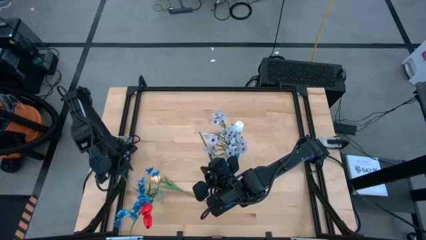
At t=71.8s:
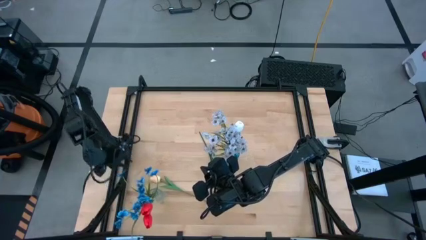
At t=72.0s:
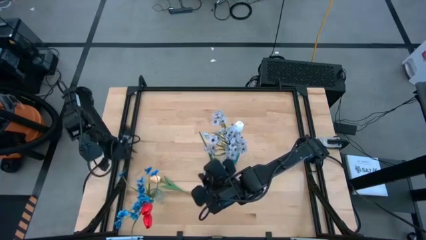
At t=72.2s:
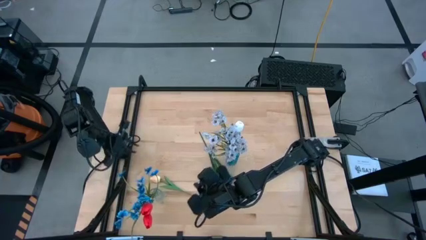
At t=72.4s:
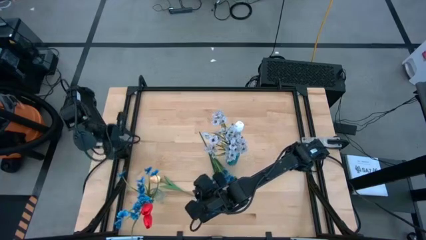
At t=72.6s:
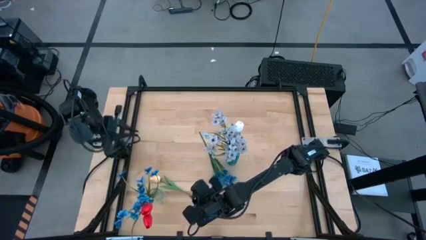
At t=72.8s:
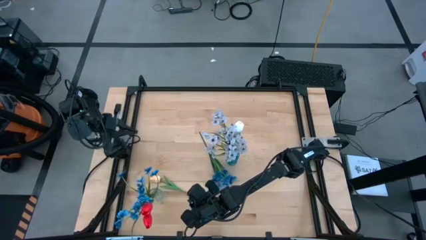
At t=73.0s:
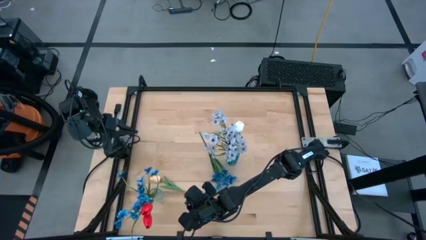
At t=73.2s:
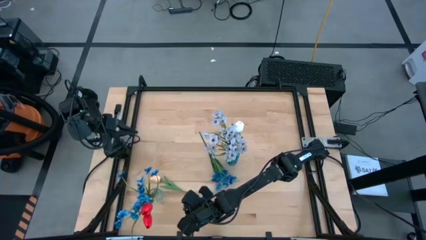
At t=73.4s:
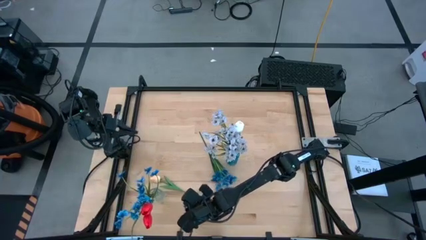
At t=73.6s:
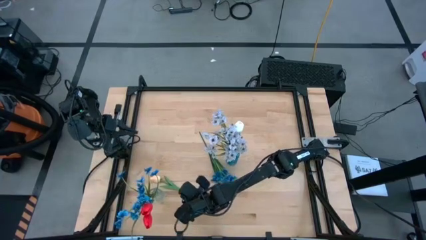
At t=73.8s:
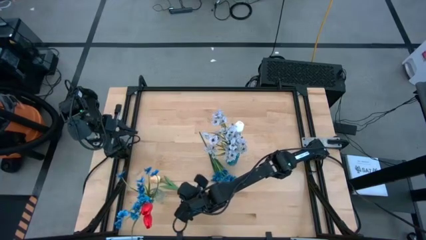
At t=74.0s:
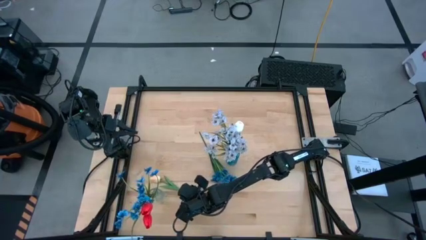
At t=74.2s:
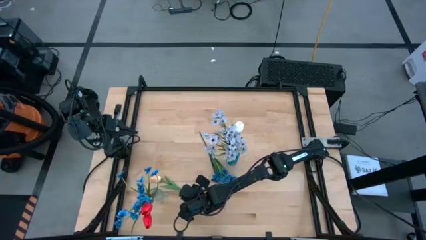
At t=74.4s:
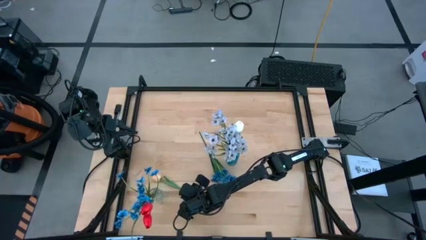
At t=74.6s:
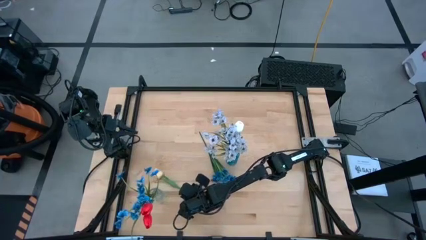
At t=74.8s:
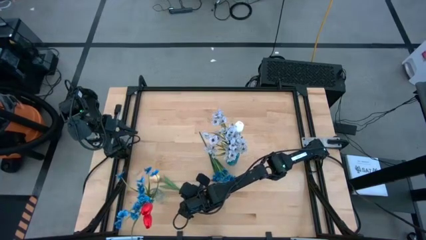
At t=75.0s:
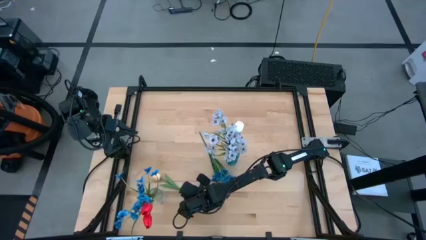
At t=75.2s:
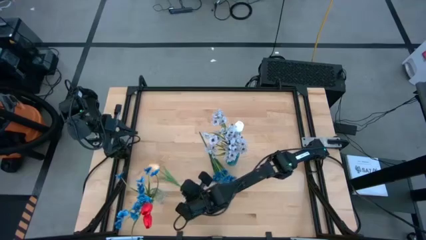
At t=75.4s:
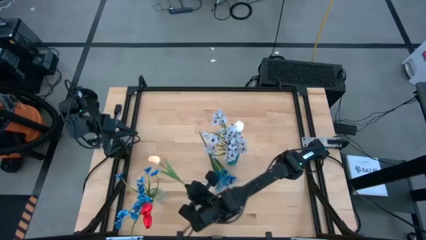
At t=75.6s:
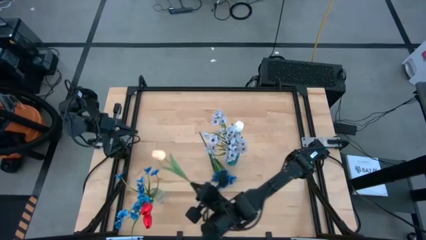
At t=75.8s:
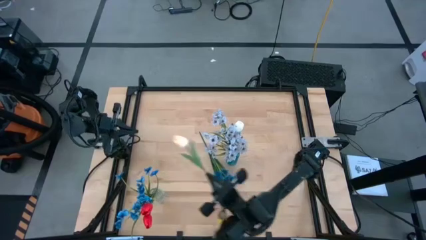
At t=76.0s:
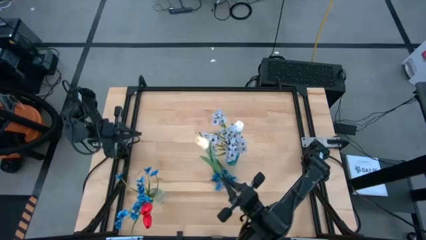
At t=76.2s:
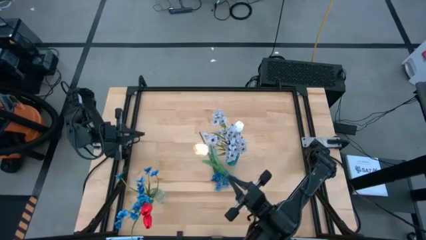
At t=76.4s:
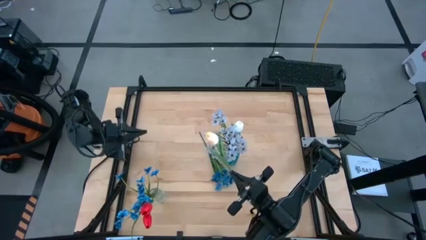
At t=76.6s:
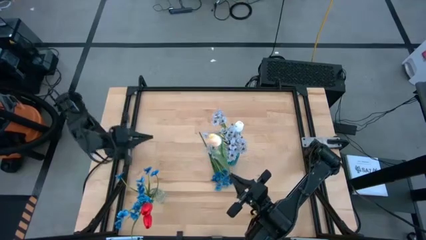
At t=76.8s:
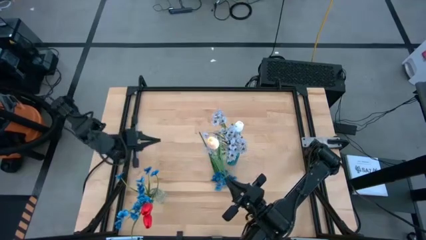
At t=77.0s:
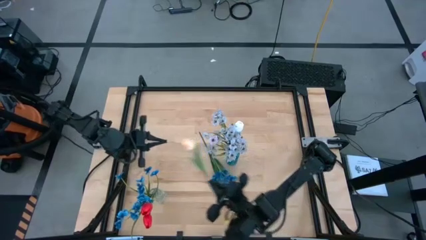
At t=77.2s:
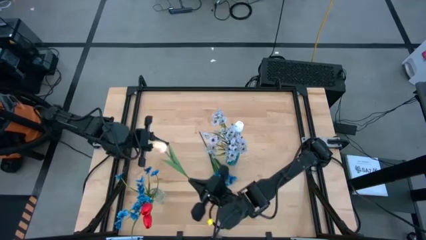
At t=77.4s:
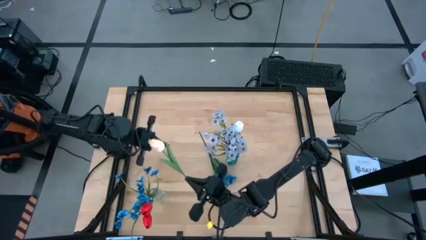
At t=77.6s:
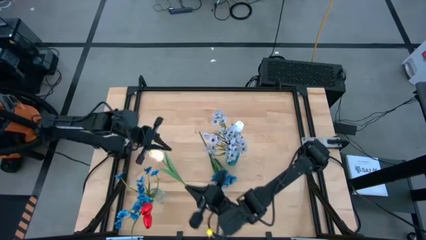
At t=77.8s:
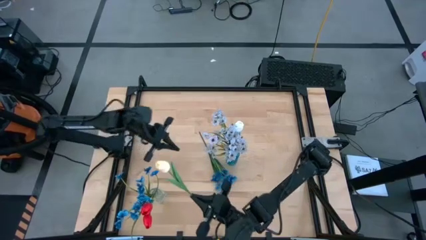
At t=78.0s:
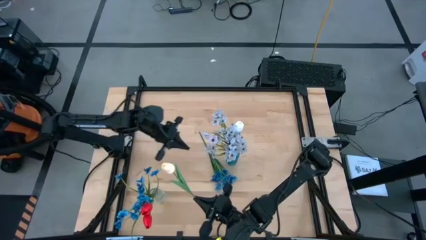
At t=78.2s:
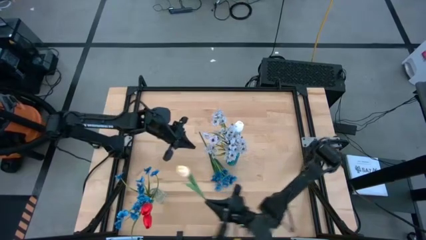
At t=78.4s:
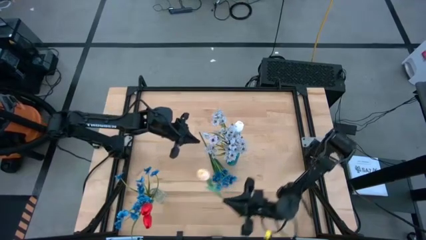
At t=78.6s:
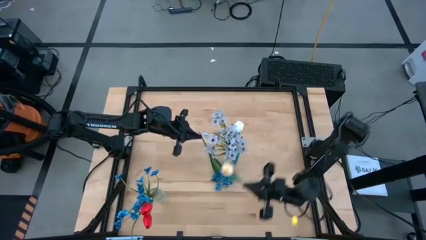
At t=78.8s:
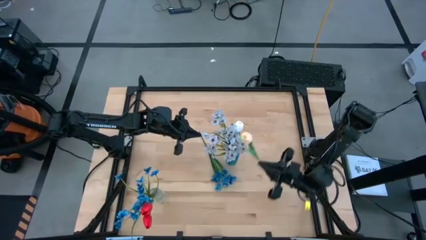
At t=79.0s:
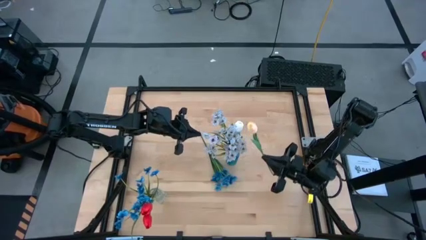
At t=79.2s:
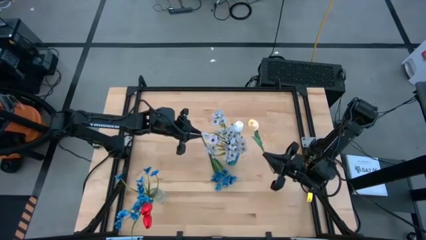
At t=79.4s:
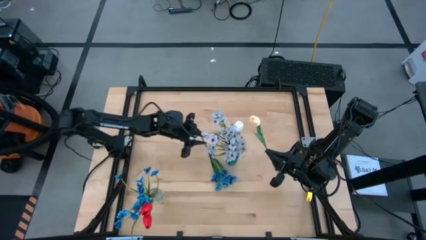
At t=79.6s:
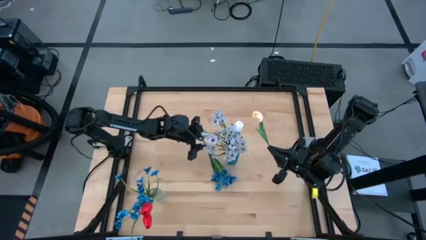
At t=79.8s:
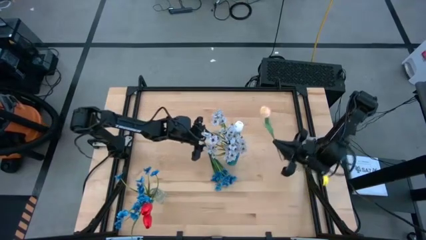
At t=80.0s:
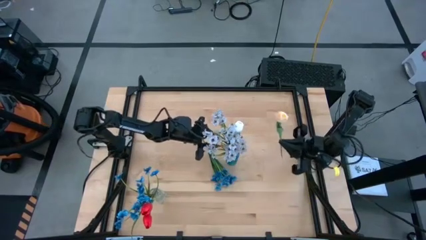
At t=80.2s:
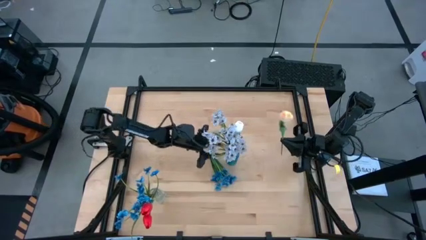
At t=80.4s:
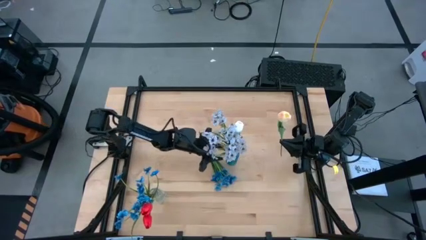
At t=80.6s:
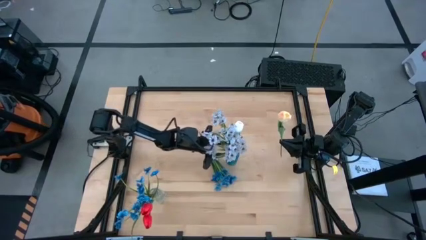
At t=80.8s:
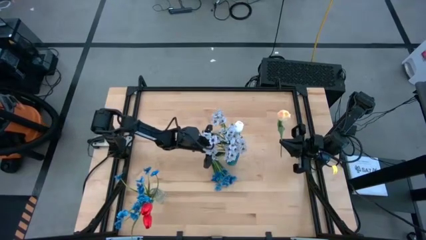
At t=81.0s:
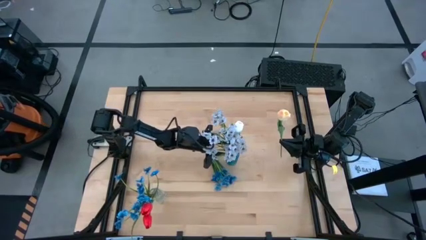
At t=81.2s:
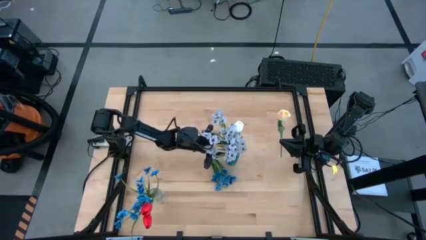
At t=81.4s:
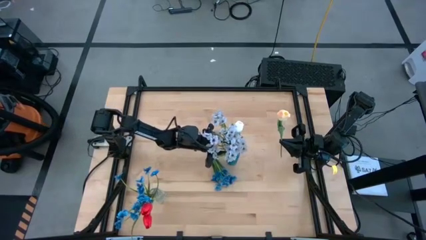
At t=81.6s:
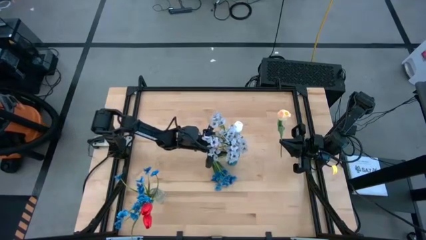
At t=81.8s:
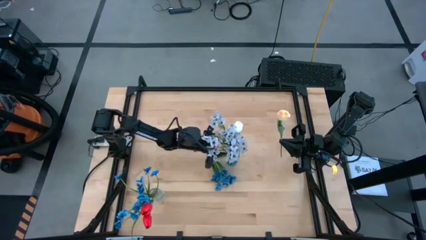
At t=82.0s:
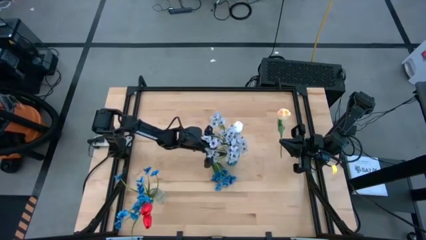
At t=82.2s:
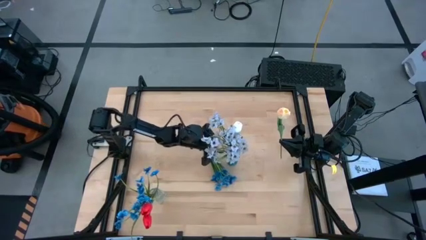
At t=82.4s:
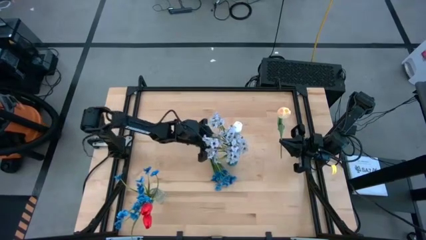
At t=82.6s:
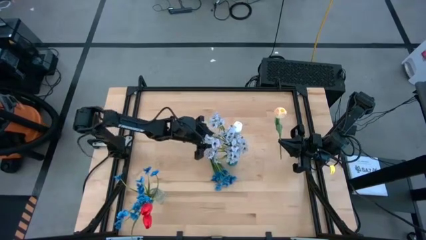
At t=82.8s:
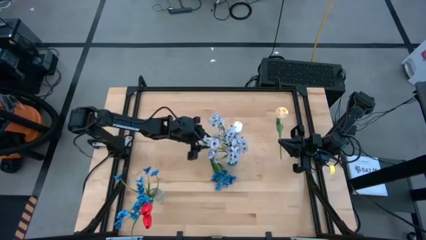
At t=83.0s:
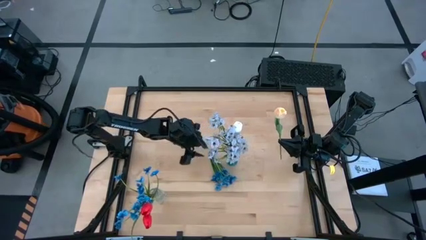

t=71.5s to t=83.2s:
Task: Sort flowers into vase by color
Put the pink flower into the blue flower vase

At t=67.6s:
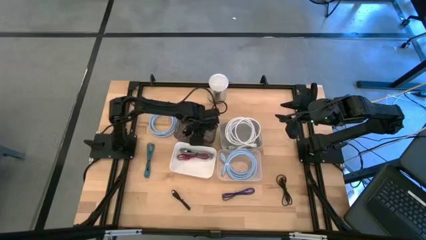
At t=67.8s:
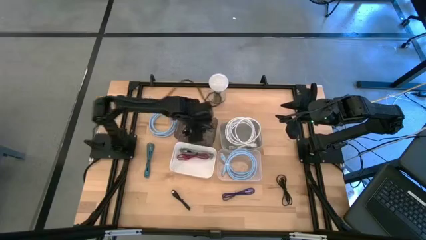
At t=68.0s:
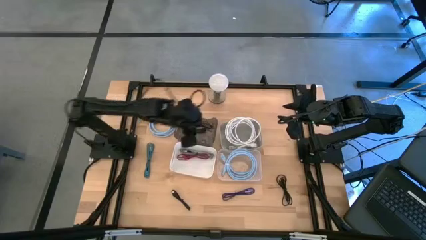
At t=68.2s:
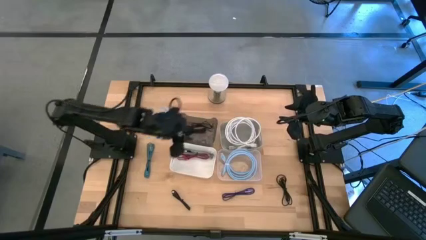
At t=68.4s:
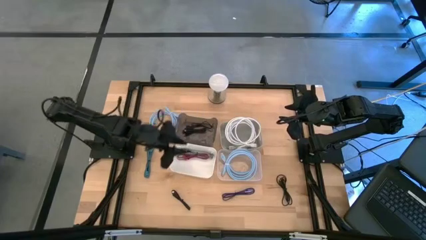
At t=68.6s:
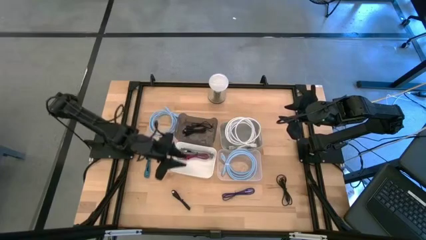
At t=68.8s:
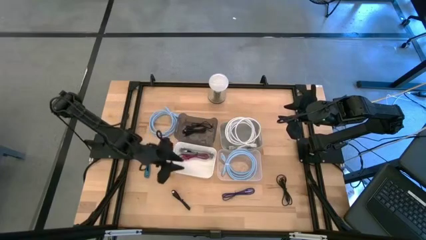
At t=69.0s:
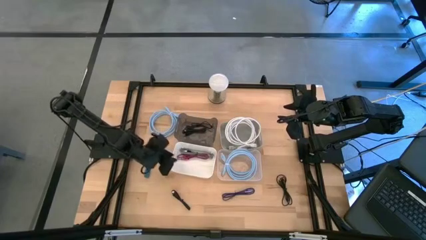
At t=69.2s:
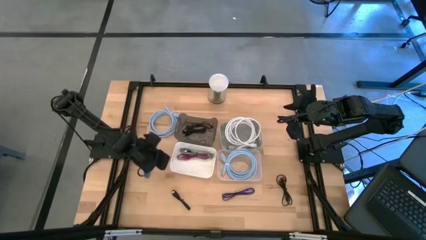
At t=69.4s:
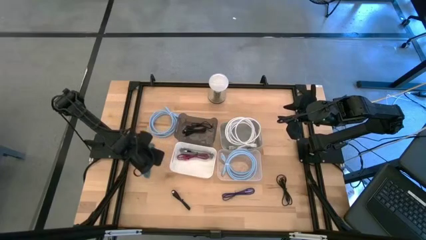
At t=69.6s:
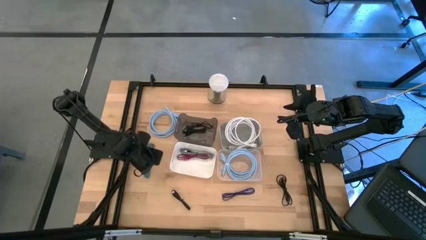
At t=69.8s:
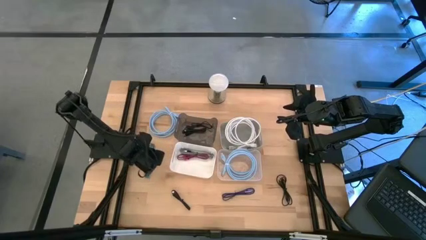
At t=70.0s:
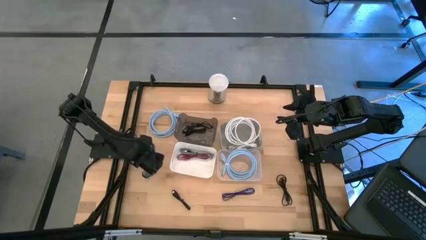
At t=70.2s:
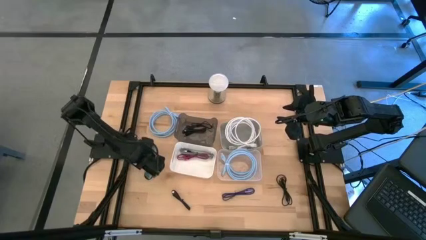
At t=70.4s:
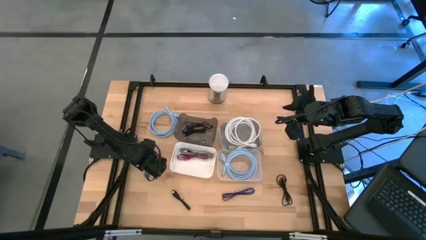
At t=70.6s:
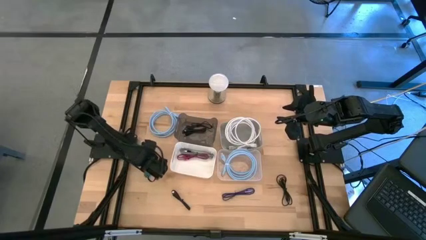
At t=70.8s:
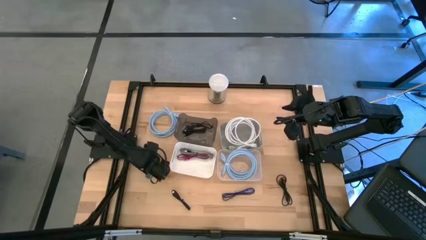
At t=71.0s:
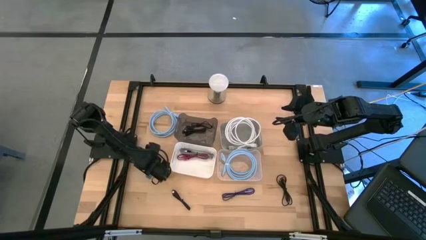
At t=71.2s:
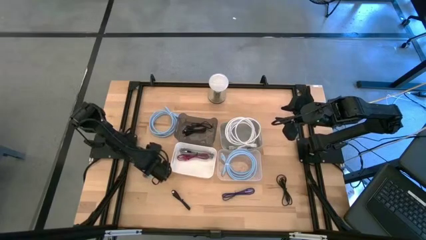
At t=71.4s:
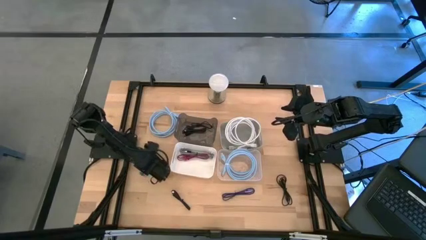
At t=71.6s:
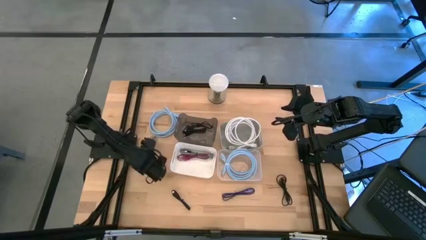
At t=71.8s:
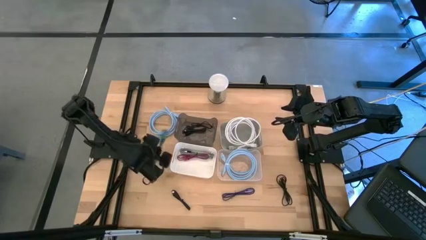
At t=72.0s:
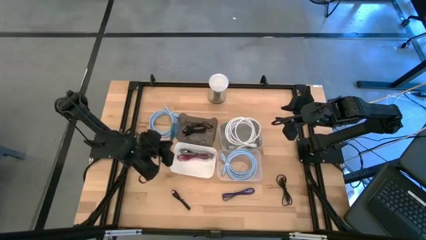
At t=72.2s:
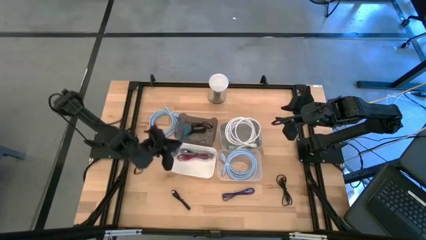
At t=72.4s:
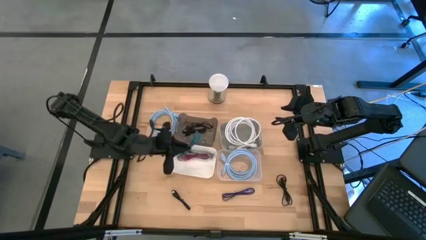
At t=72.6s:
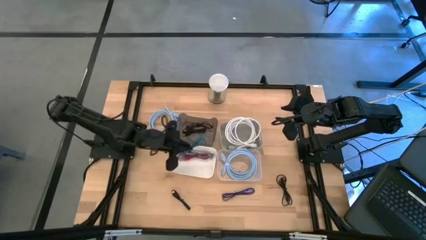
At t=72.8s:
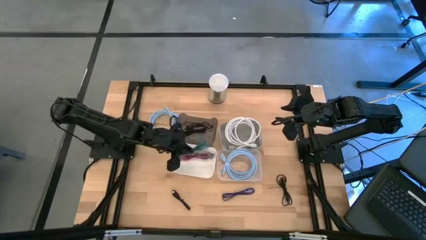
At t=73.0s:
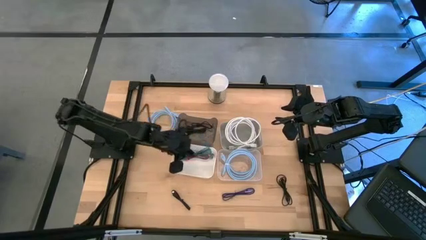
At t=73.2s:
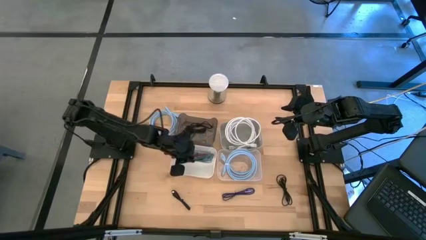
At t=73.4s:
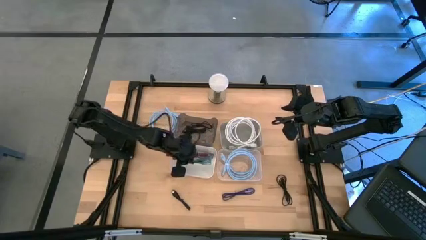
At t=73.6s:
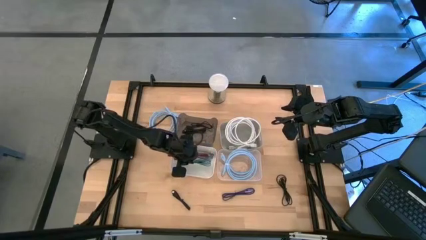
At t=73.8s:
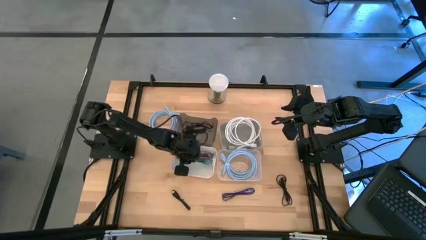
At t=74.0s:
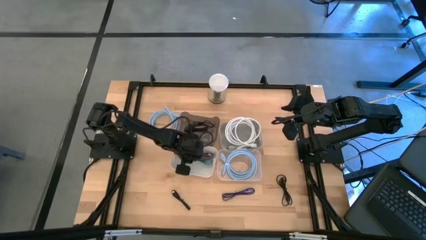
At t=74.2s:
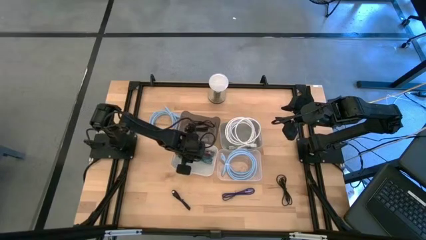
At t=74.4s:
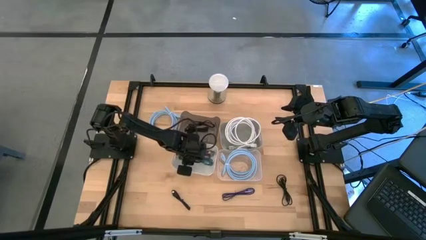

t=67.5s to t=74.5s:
Task: Pick & Place USB Port
Put the blue patterned charger cable into the white bin
